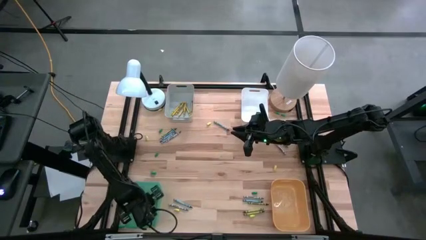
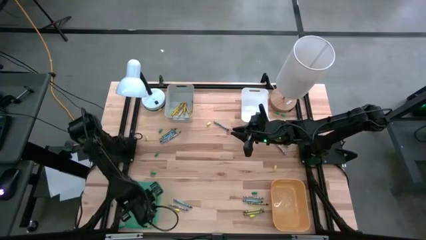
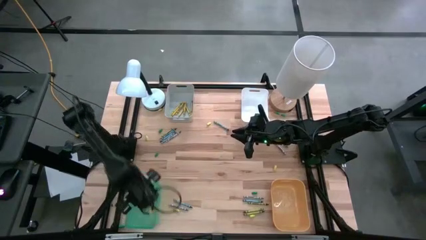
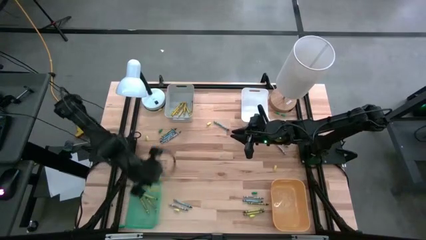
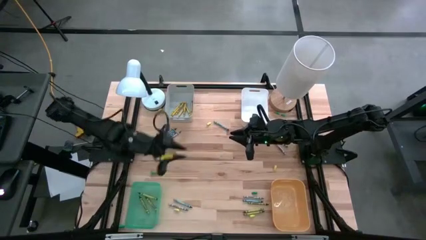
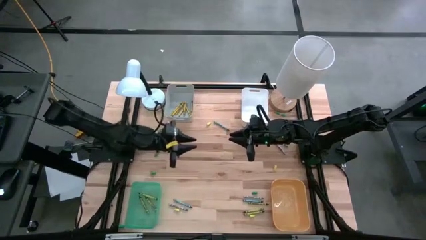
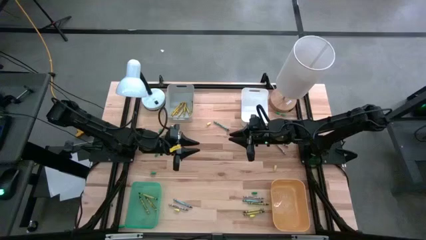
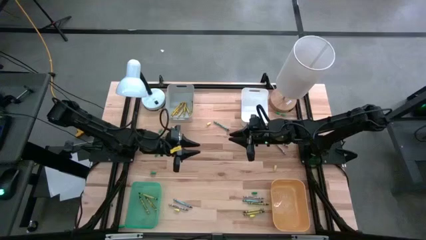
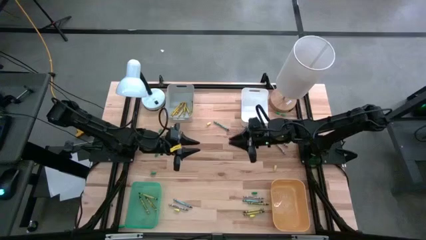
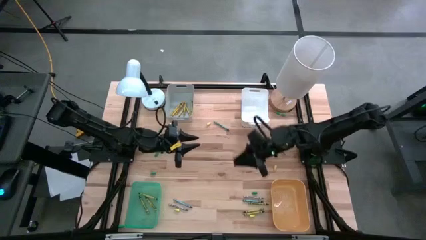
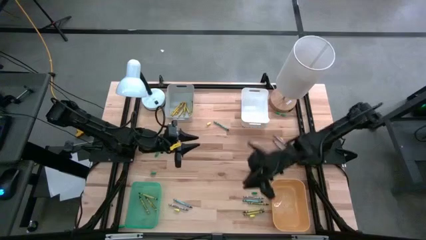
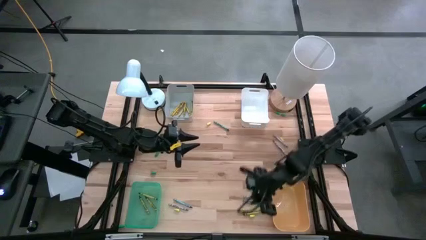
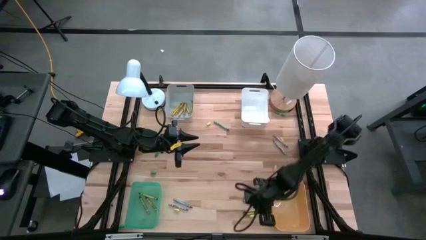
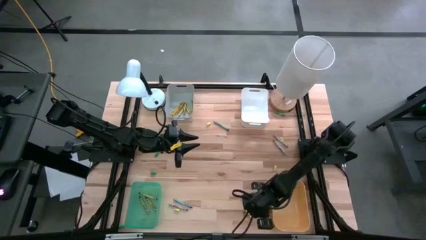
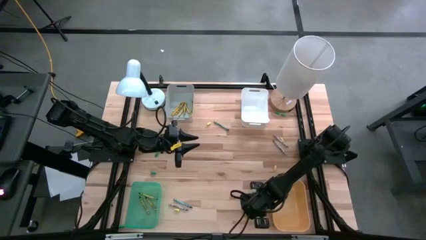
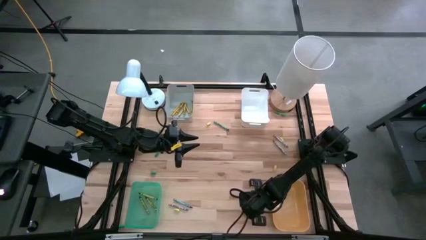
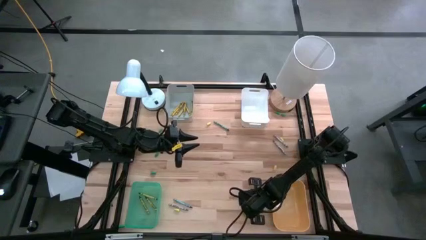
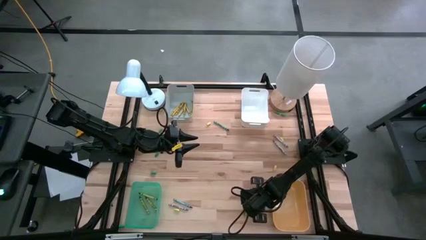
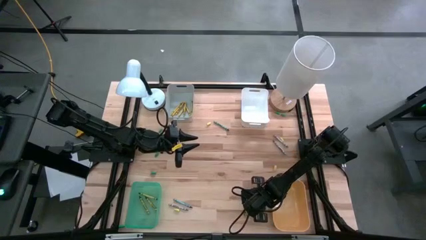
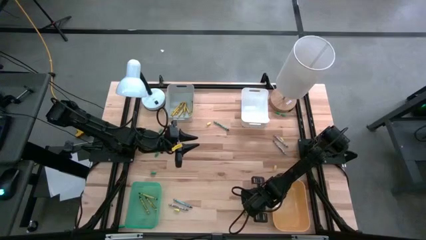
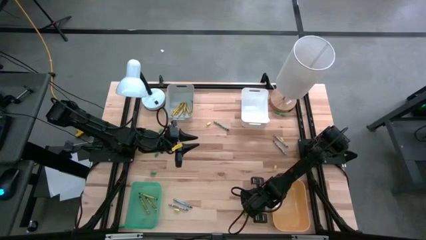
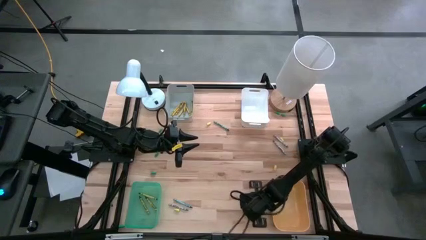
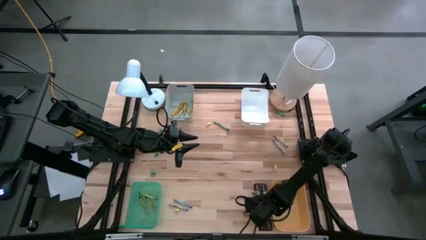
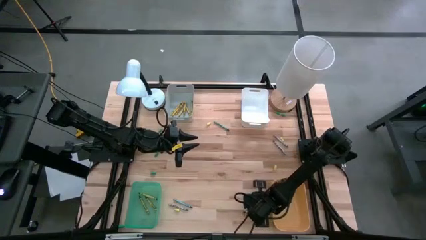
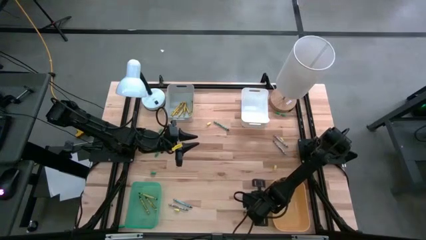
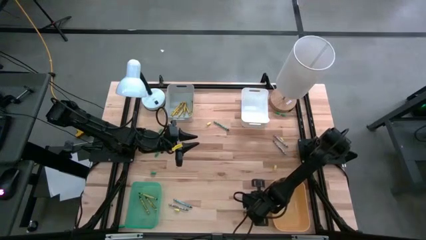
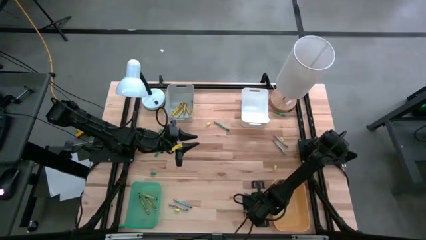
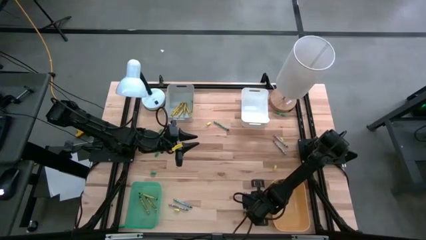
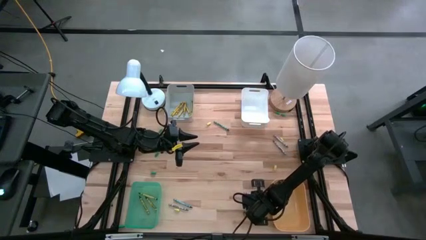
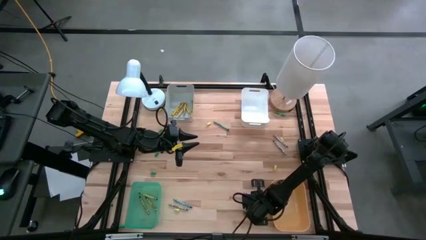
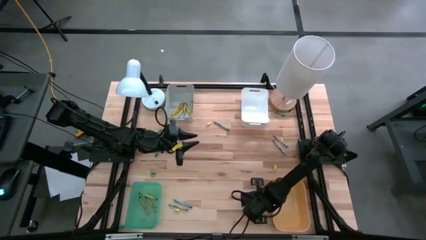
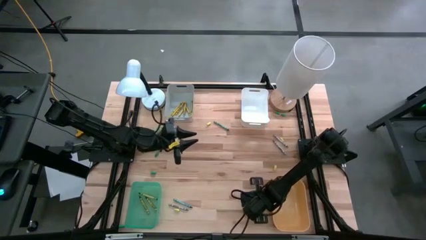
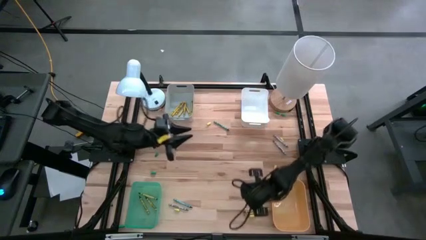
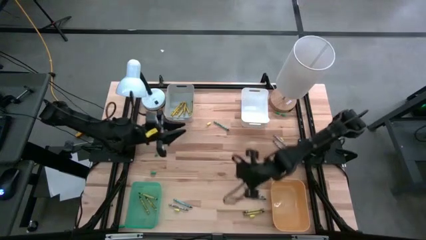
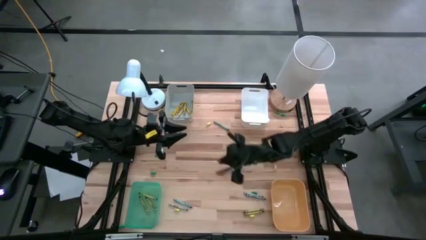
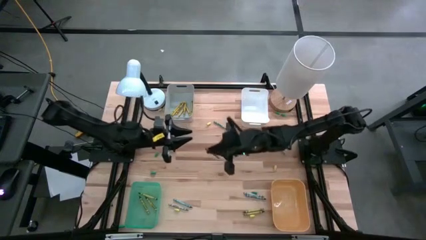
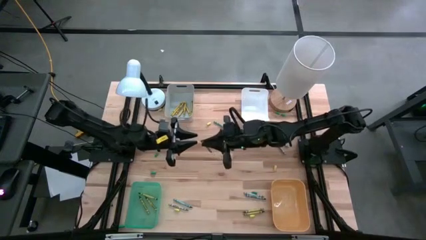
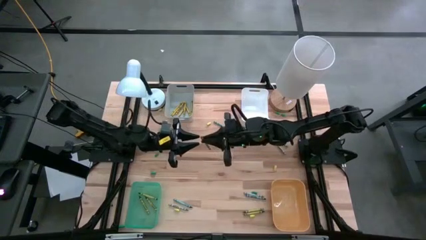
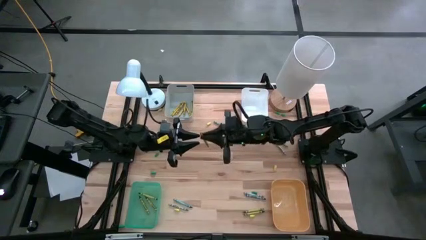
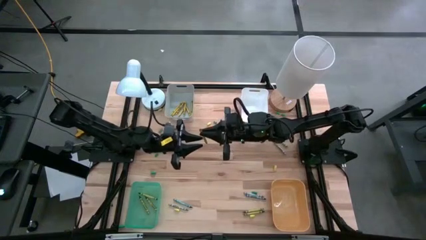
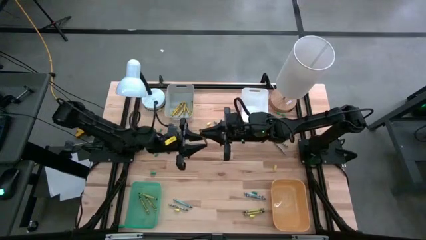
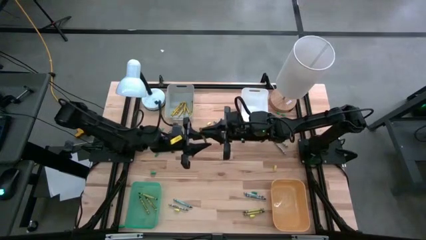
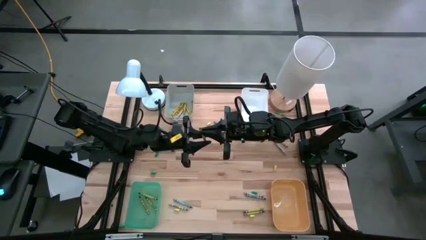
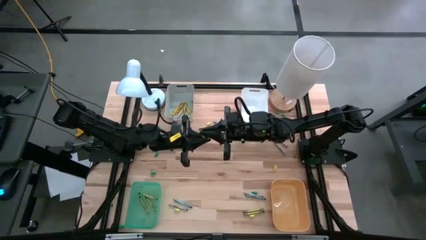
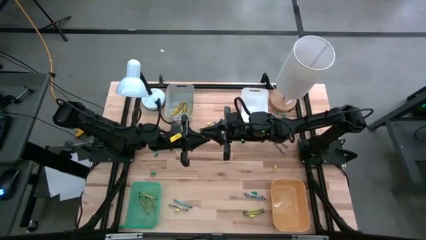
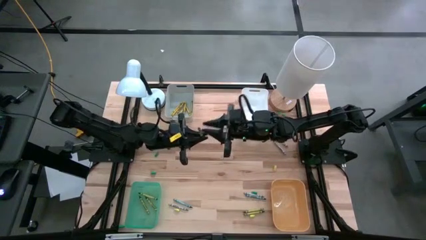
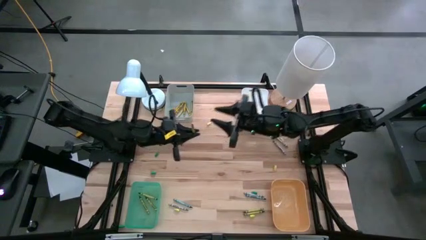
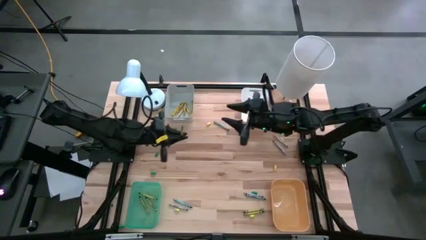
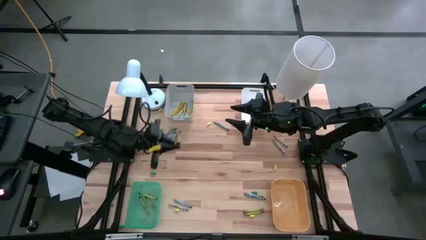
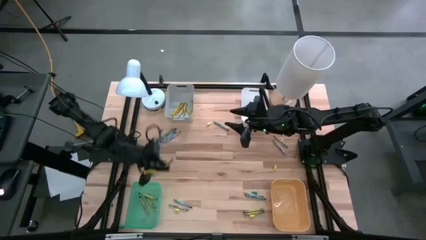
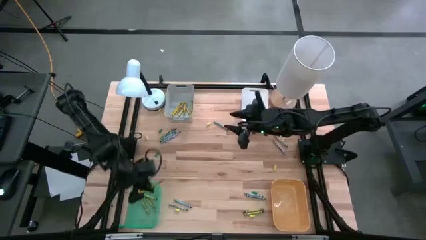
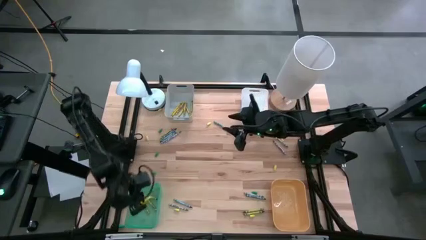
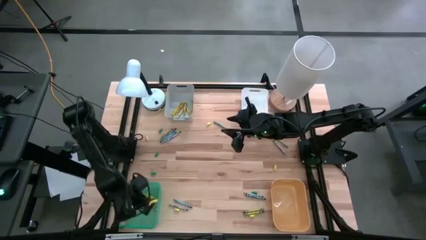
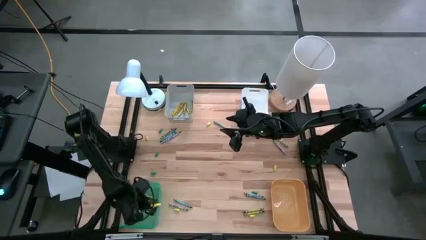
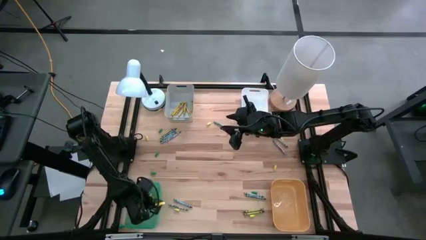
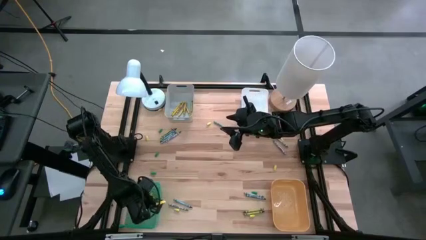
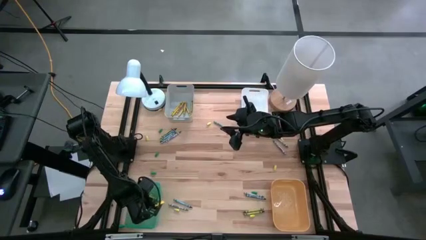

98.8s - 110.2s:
Task: Sort crayons
Put the green crayon into the green bin
